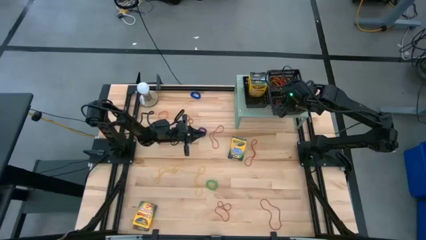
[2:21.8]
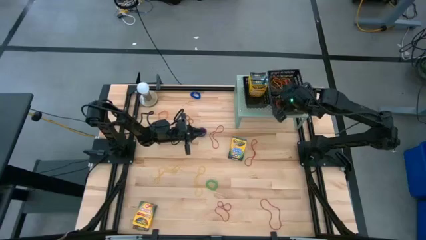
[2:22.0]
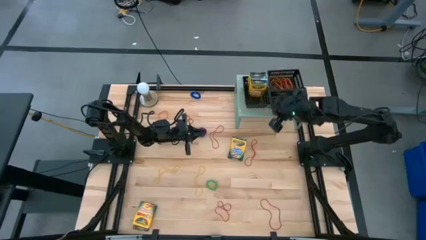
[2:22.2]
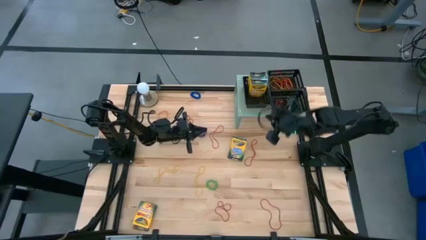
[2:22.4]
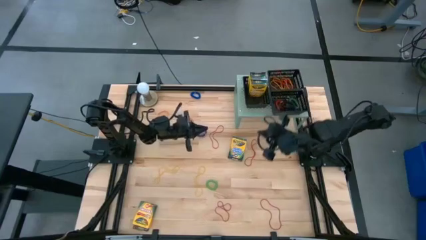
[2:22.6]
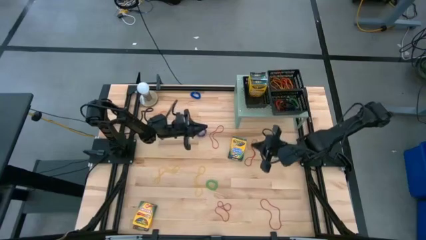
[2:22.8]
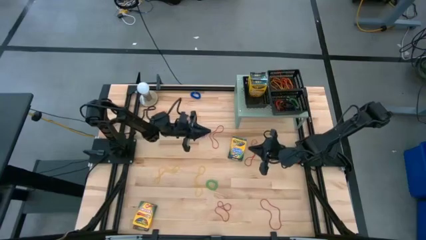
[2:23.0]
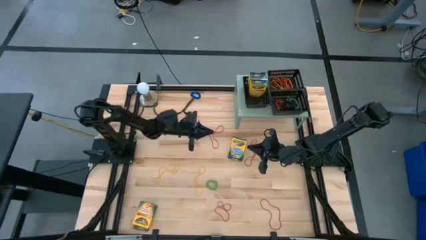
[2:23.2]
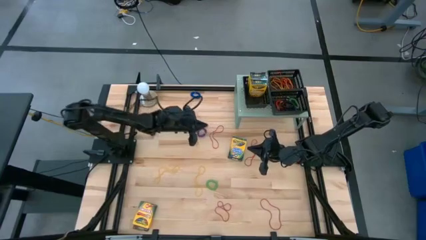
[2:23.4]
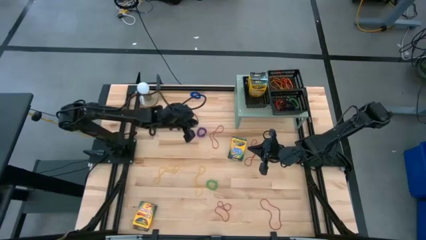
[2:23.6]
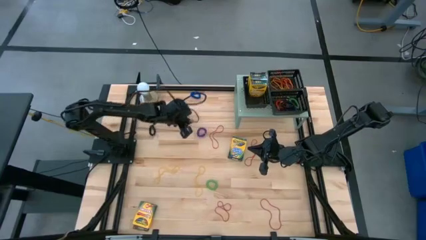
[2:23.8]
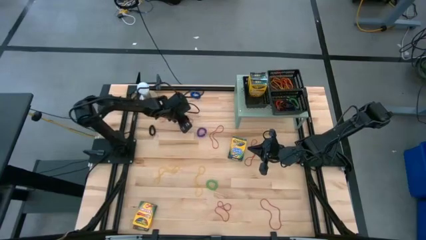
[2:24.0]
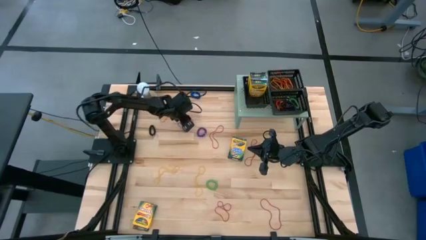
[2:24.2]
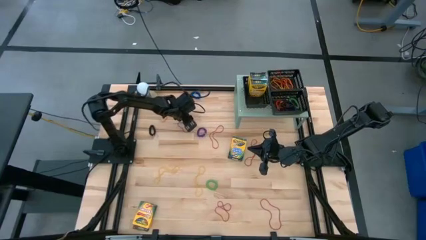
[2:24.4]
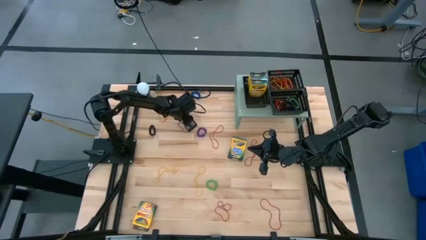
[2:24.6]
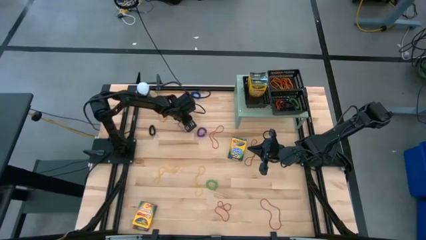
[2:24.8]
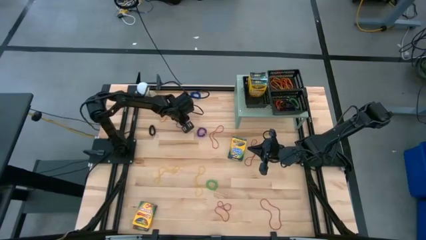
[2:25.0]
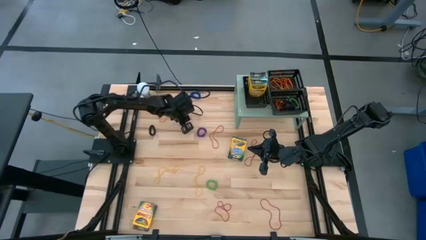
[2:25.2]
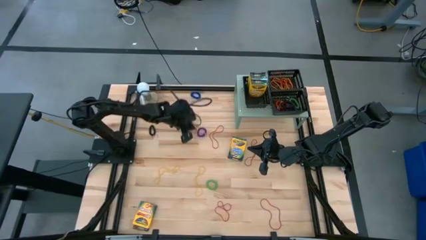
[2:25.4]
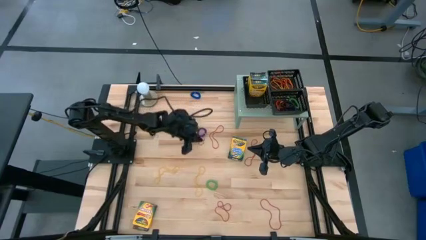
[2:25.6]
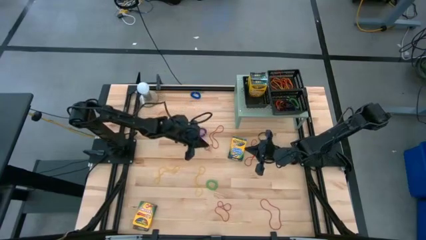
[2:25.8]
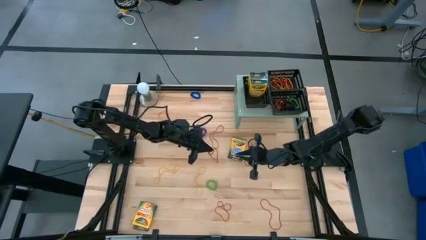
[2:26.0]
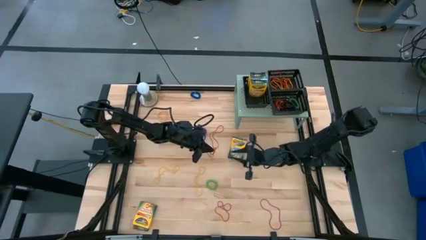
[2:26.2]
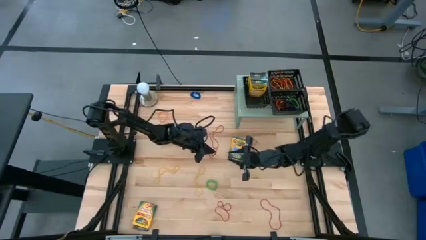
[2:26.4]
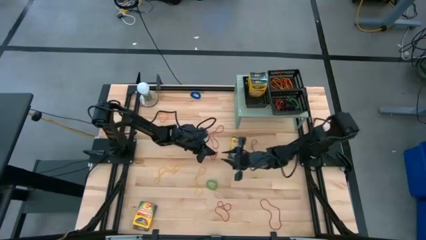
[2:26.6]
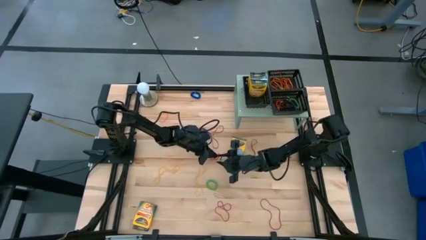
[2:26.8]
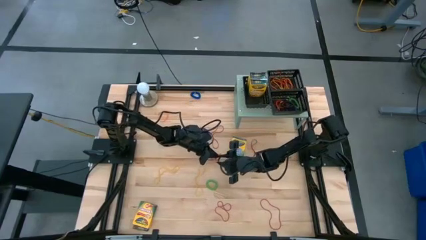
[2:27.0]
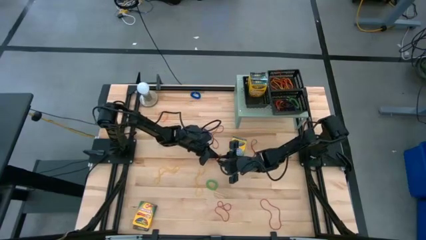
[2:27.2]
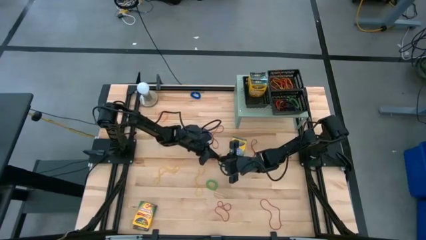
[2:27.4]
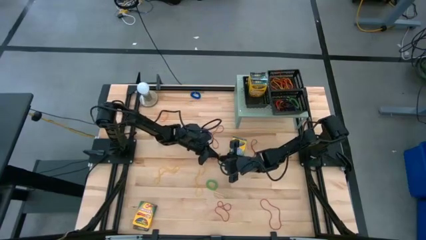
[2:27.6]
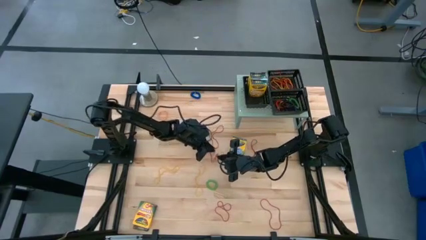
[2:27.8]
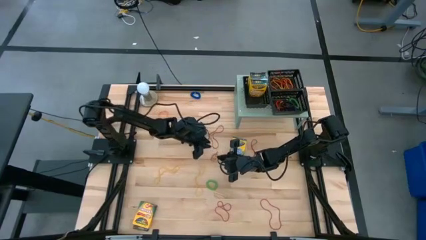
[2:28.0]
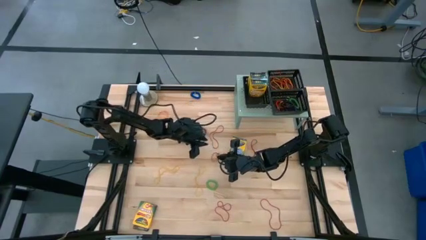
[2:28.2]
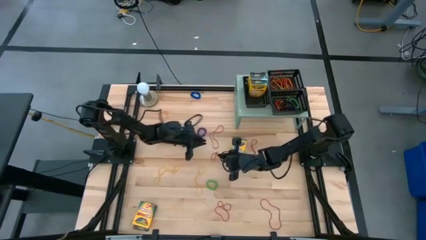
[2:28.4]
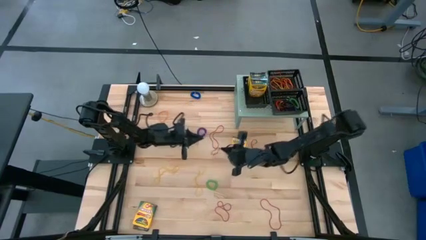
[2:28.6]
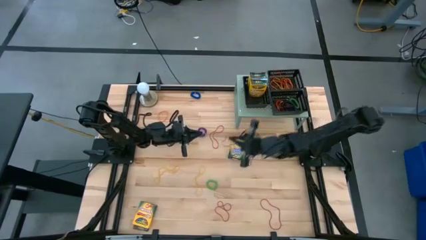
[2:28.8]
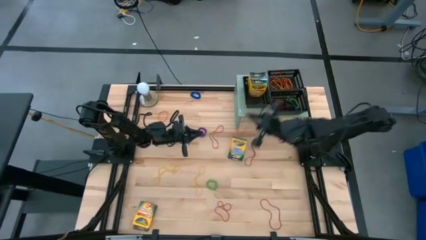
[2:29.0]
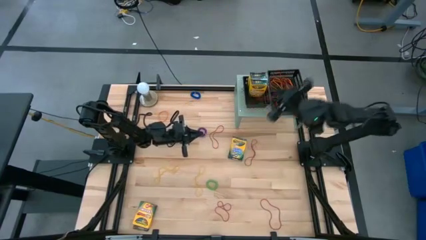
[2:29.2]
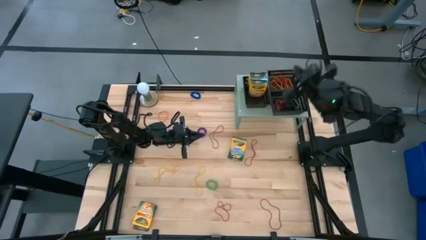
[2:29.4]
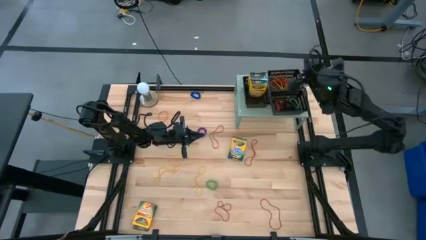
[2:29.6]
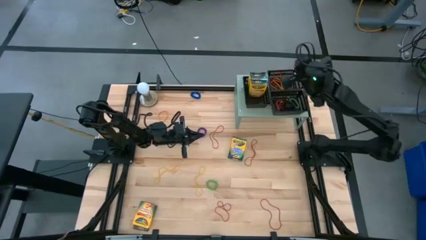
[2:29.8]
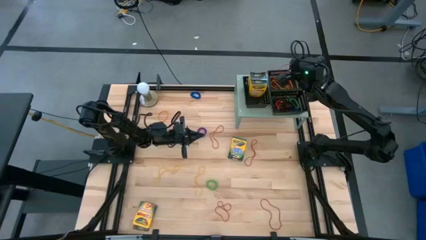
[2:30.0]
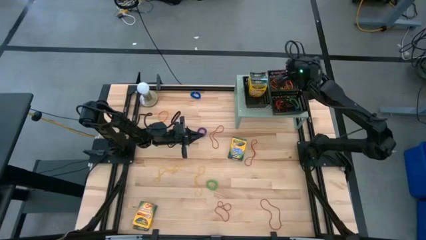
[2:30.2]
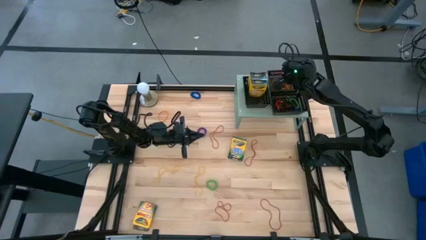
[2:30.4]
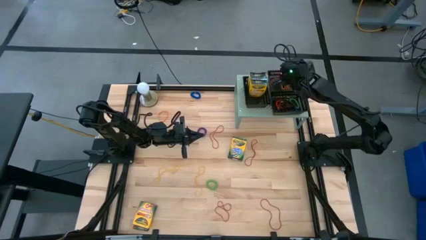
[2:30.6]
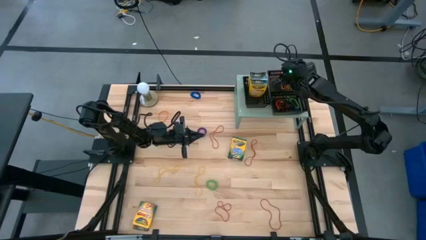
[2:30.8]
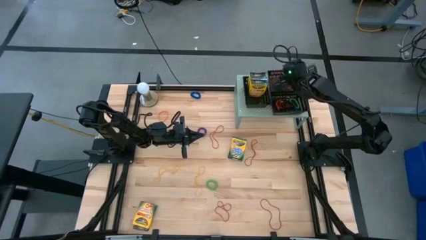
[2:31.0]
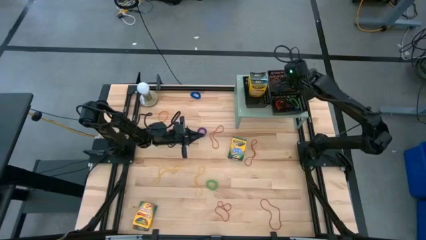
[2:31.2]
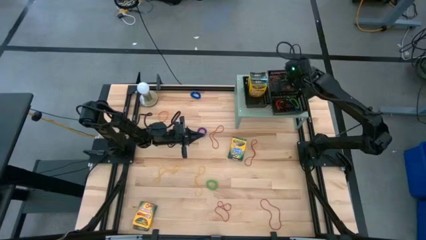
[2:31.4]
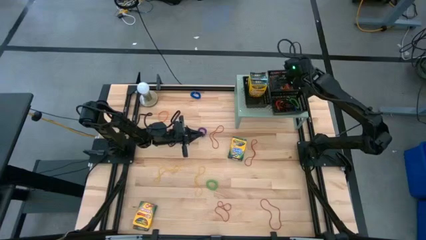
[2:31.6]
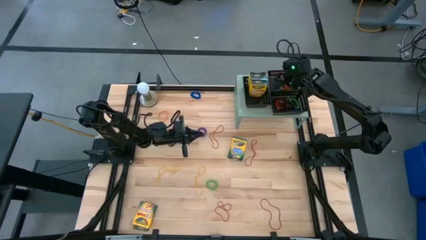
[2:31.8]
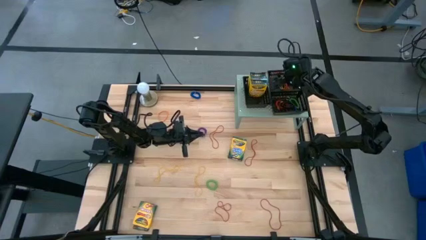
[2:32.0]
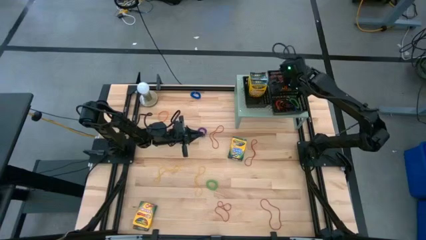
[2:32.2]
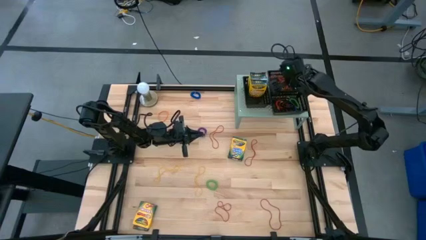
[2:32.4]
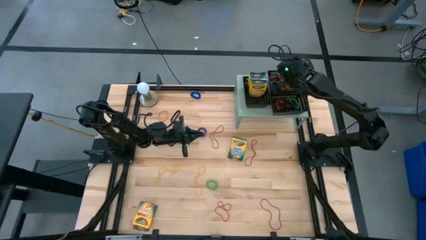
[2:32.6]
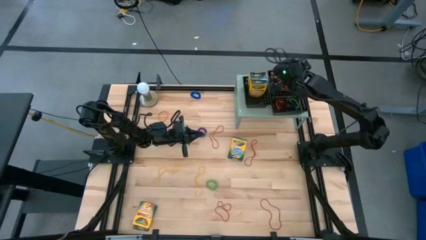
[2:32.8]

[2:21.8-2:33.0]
Task: Pick & Place Office Desk Supplies
Put the red rubber band into the top right black bin on the shelf

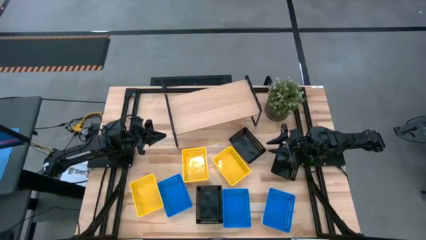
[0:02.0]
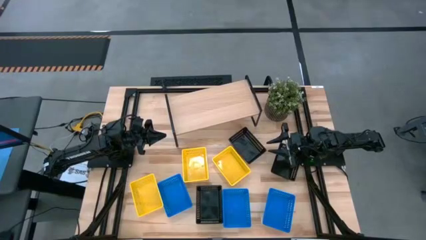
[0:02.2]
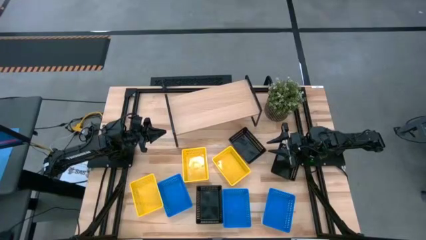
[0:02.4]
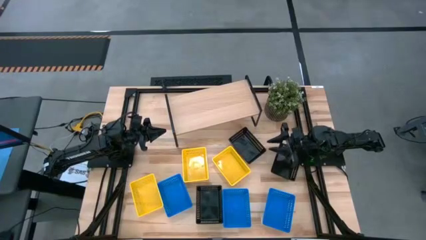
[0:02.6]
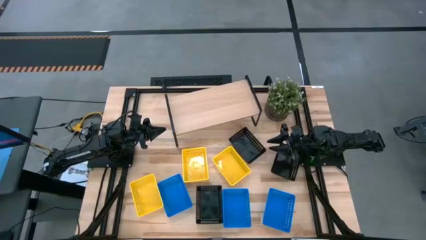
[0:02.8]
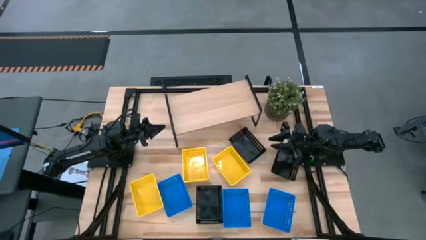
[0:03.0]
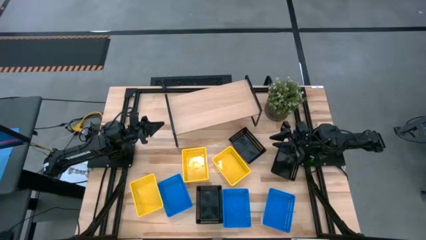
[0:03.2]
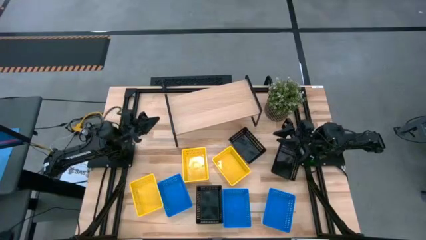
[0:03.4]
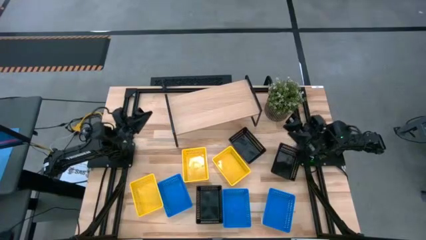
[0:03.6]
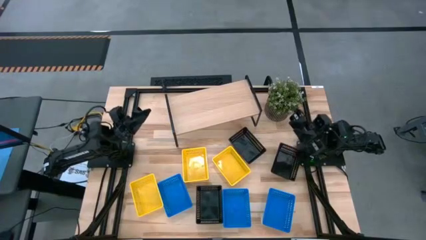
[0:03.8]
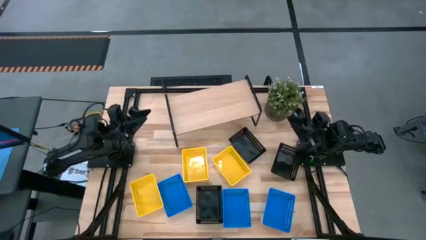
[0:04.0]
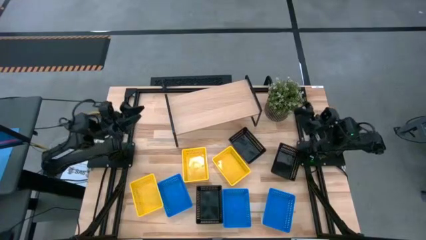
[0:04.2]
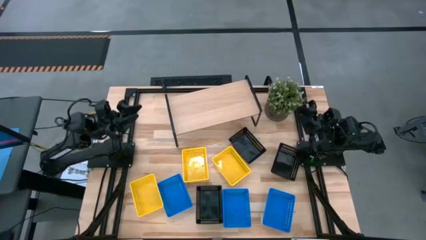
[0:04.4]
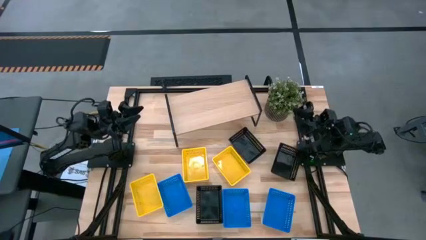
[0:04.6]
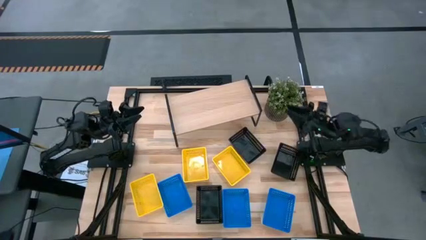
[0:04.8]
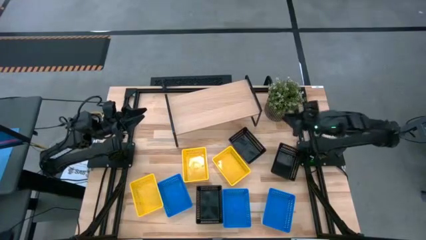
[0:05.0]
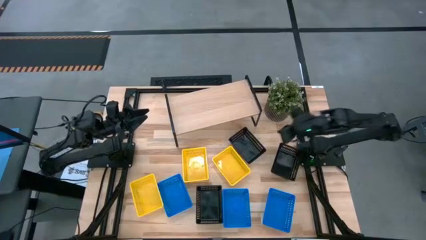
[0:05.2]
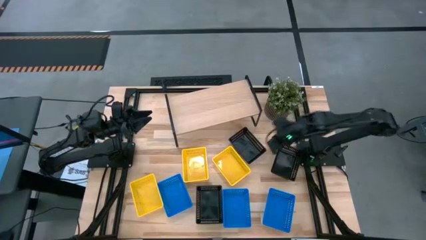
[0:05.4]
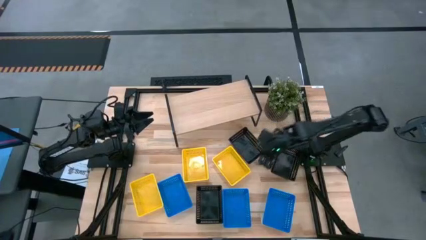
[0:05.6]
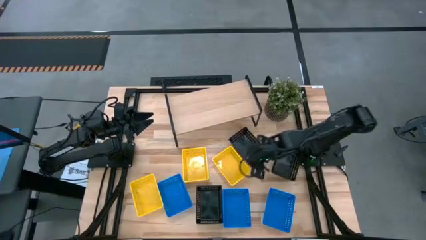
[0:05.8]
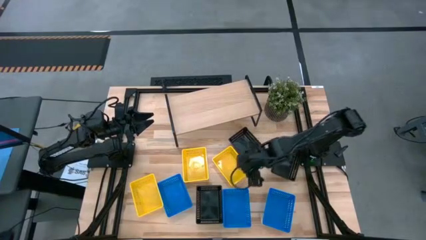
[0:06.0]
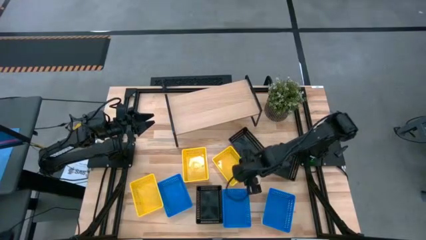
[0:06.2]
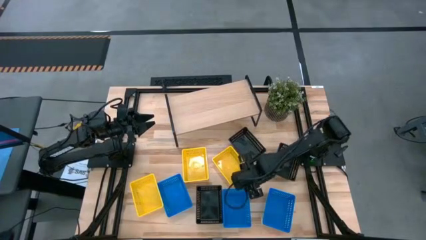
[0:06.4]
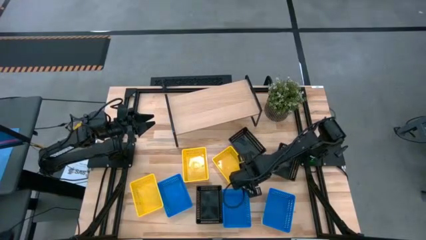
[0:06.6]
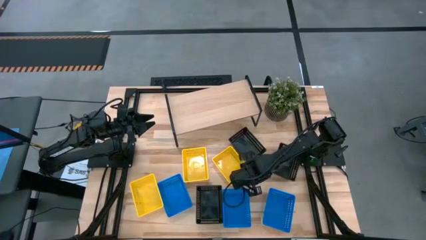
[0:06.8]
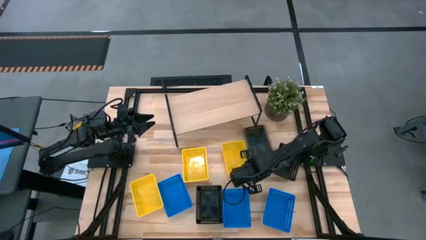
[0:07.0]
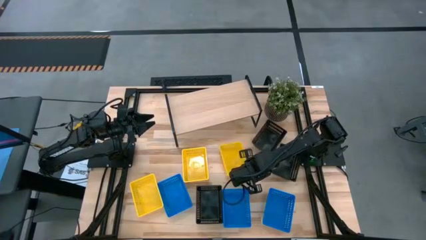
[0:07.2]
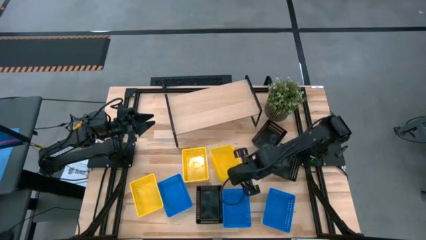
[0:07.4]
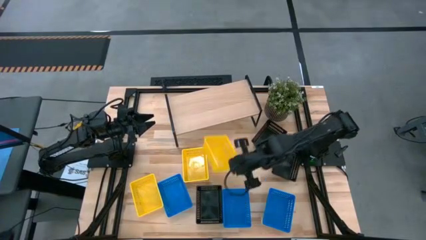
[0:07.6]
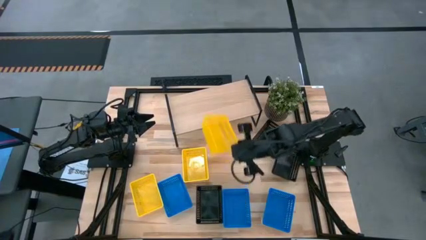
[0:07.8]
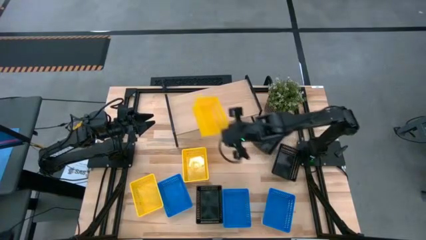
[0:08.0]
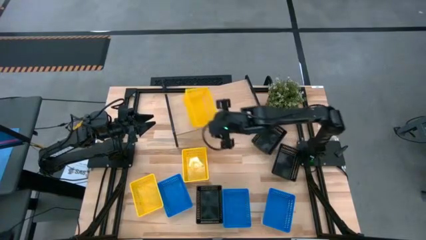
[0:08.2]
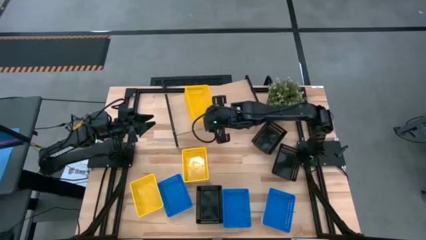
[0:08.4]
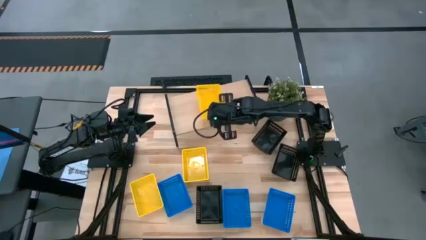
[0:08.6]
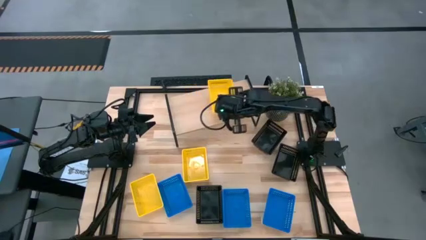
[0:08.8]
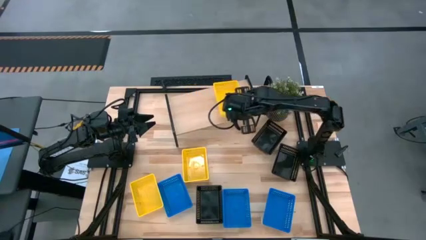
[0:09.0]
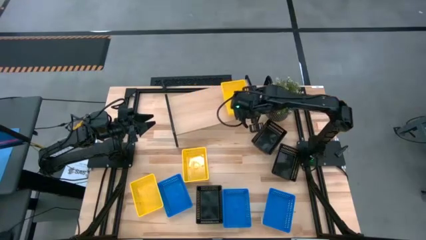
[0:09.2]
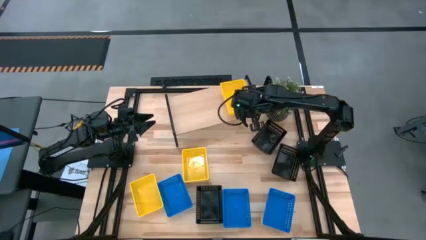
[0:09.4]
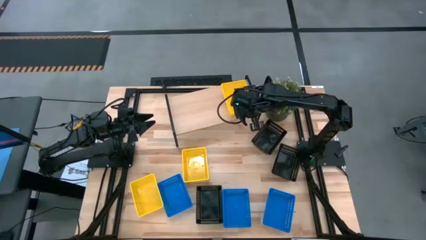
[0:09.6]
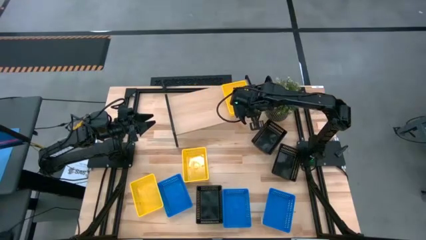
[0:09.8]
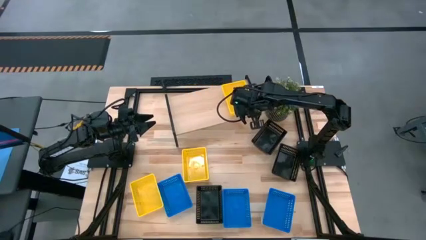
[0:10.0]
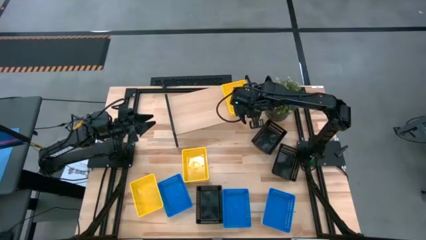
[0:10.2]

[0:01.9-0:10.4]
Task: Stack baskets on shelf by color
Put the right yellow bin on the shelf
